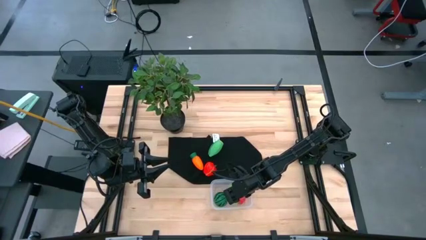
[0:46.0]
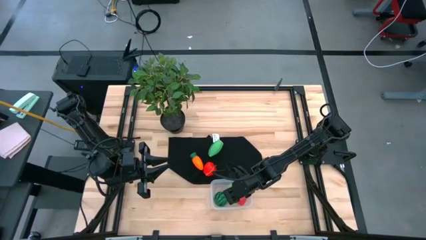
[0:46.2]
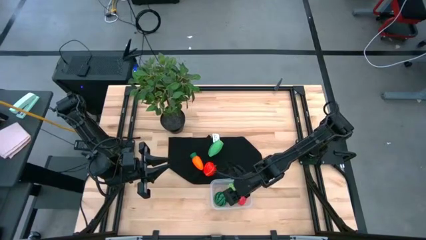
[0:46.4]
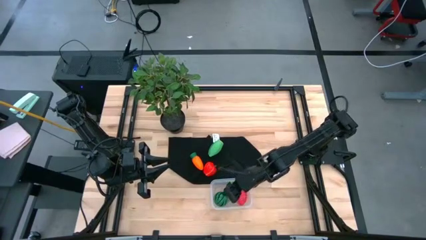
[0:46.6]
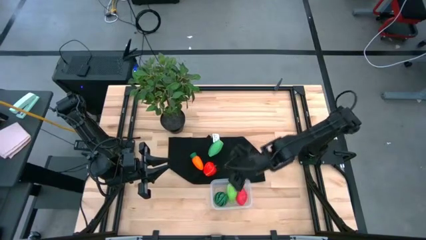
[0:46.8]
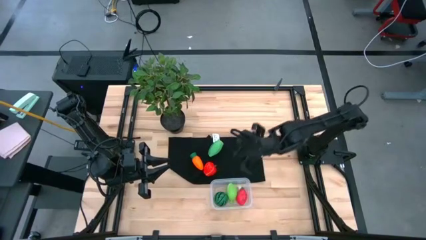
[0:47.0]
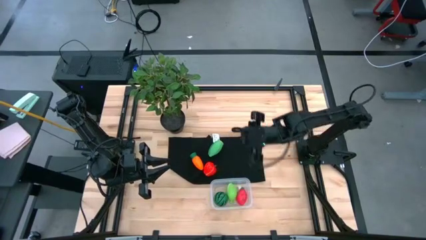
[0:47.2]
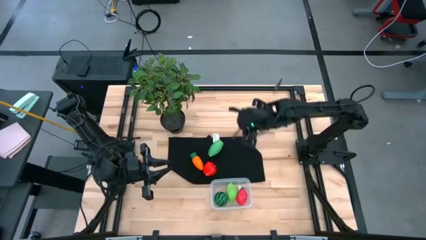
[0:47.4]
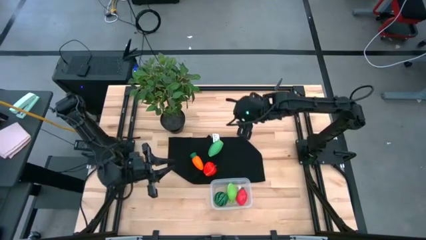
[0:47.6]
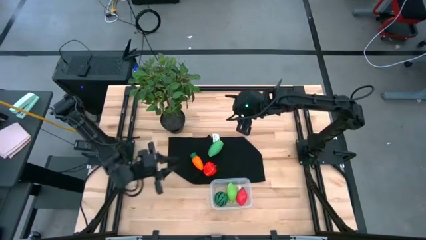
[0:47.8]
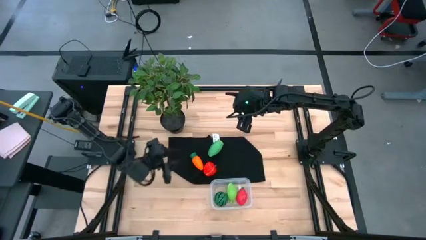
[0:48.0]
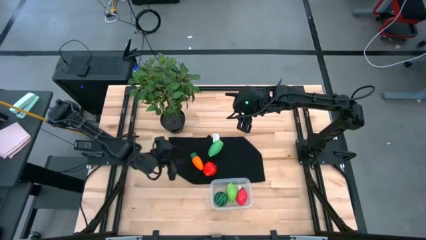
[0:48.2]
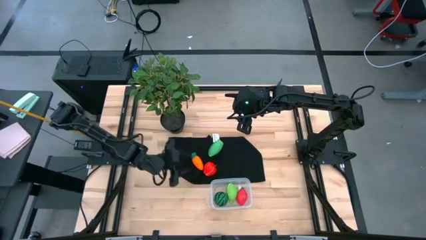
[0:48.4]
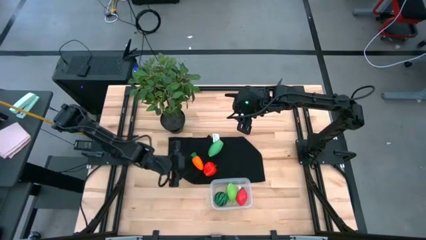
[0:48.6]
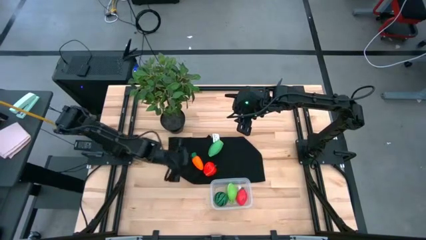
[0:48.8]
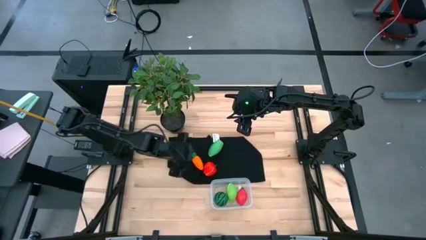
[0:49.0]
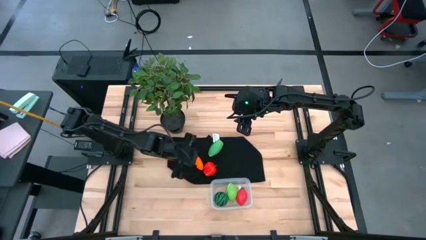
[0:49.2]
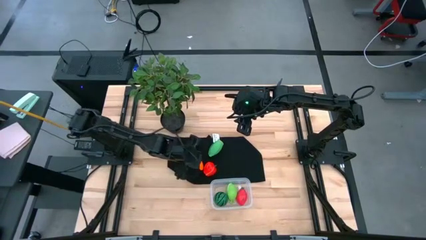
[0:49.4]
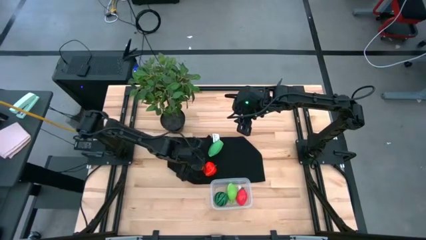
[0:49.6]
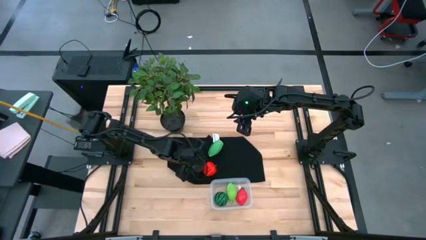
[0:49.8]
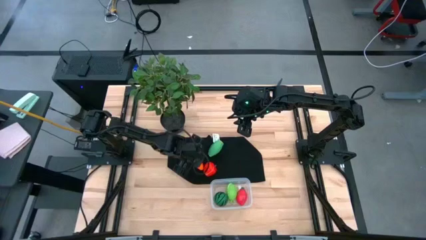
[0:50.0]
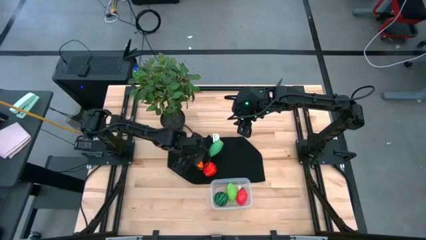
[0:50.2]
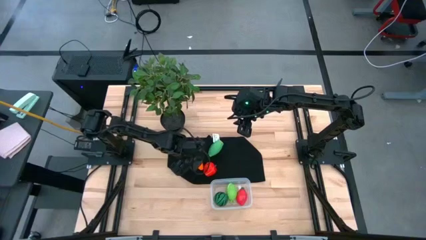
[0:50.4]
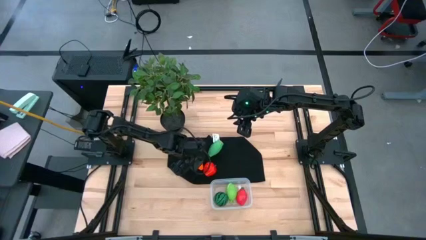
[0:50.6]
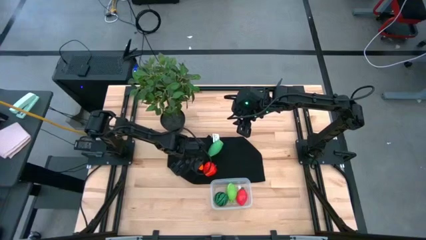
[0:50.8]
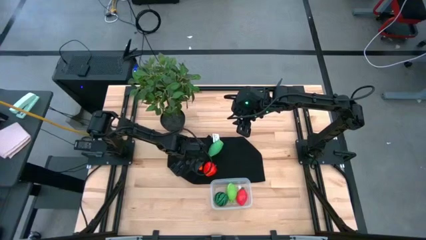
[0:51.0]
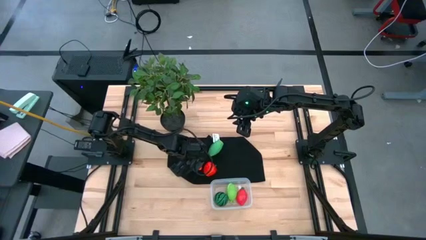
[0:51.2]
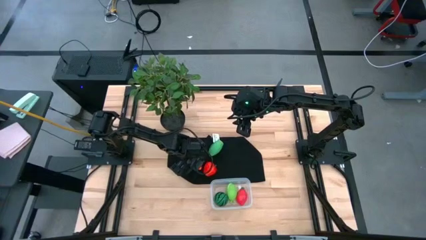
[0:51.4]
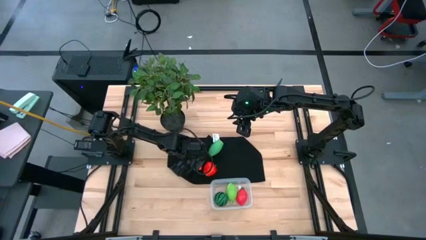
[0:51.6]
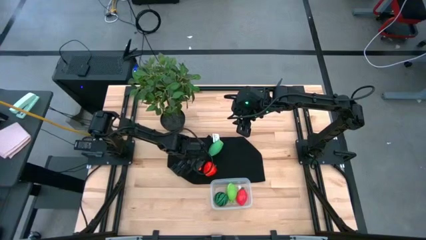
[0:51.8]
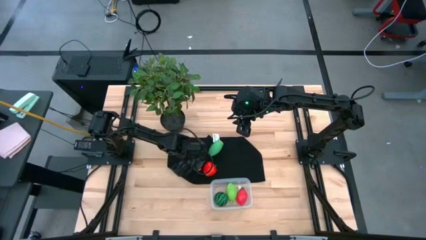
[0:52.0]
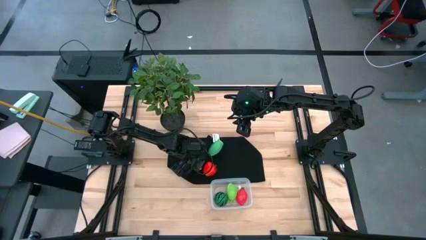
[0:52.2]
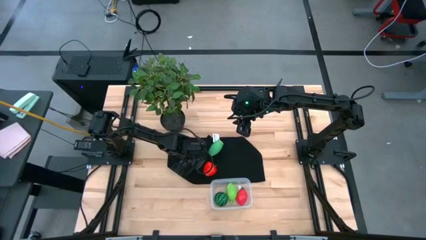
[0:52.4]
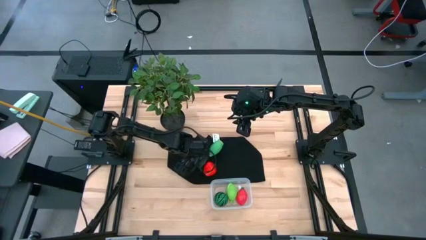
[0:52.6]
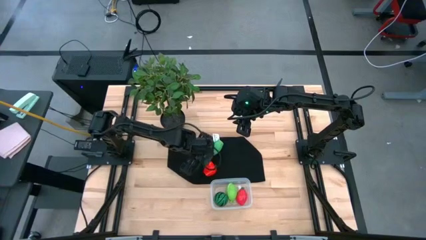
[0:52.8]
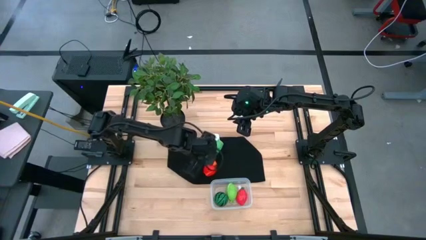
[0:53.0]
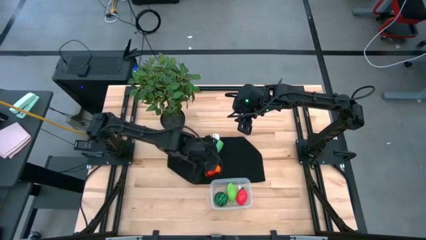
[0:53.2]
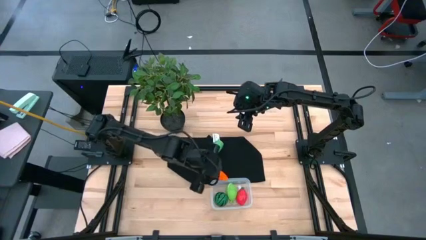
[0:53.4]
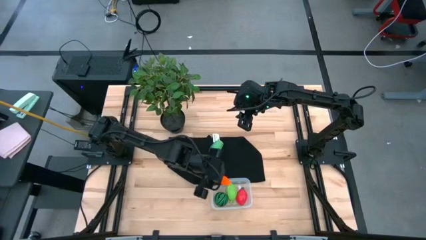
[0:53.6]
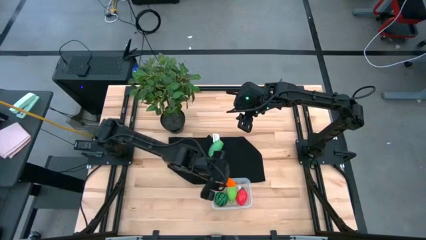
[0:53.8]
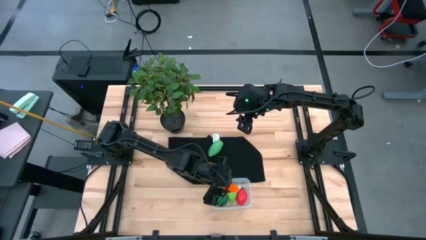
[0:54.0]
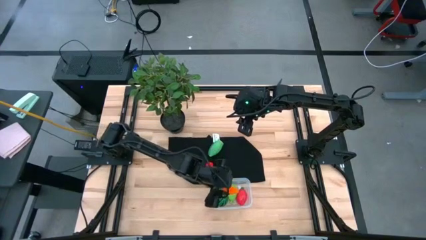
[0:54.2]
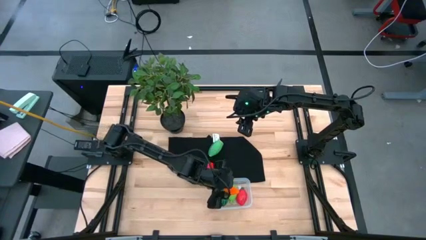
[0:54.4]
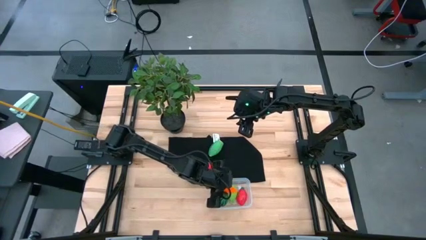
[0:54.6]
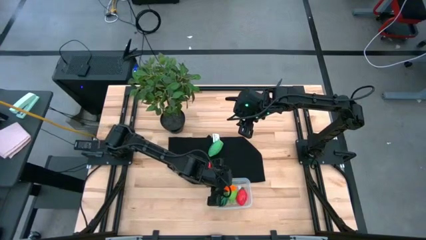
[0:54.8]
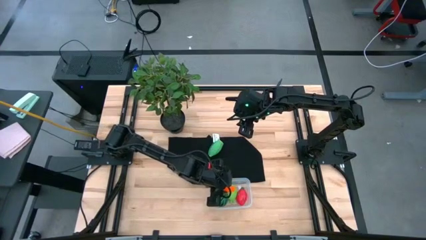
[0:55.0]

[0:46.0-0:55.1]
Task: Pick and placing Produce into tupperware
Put the carrot into the transparent bin

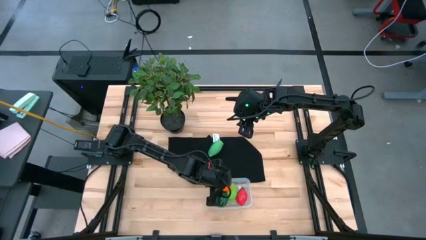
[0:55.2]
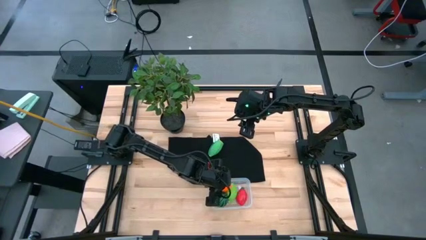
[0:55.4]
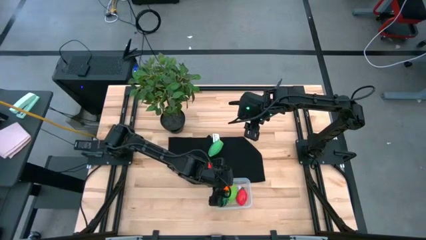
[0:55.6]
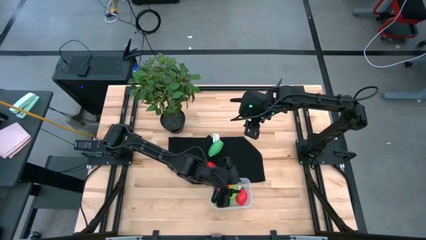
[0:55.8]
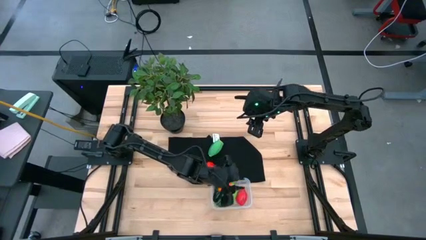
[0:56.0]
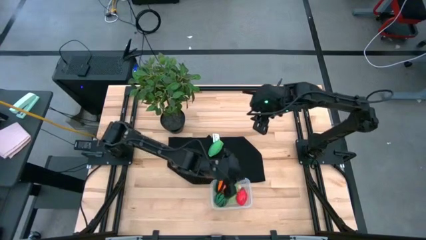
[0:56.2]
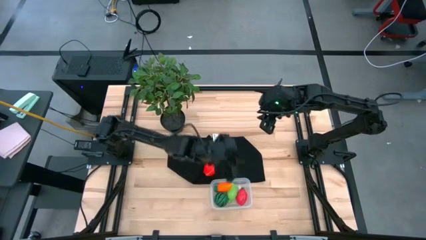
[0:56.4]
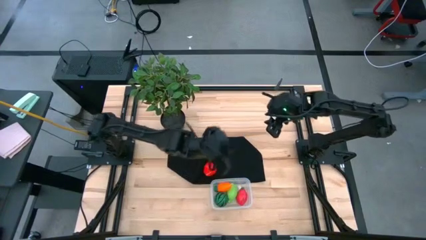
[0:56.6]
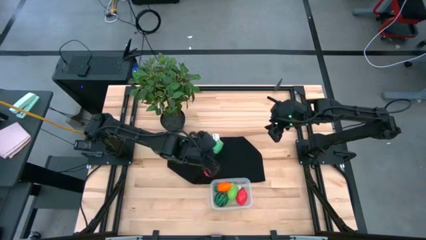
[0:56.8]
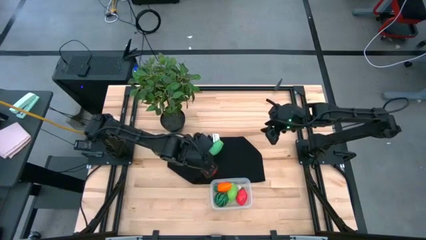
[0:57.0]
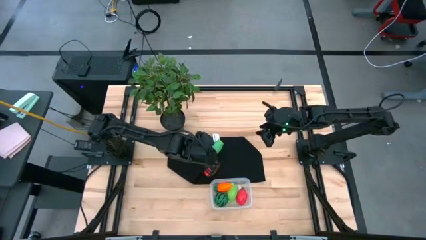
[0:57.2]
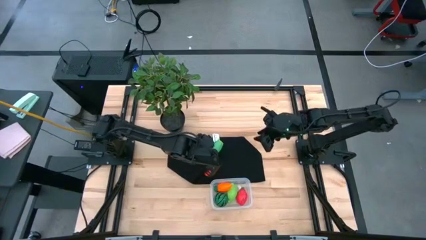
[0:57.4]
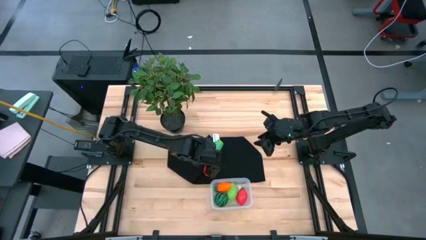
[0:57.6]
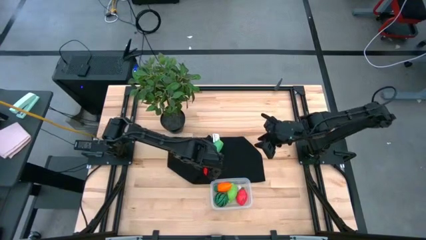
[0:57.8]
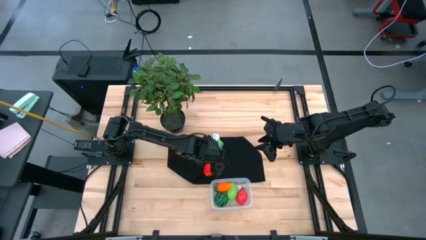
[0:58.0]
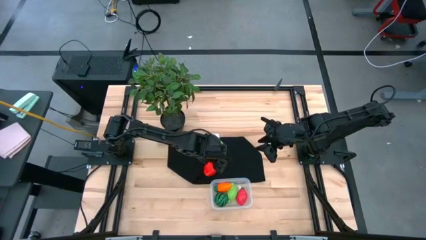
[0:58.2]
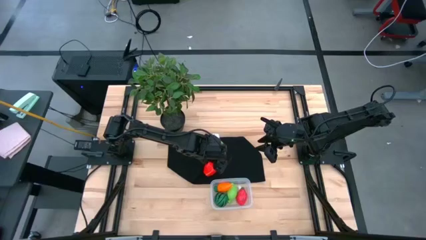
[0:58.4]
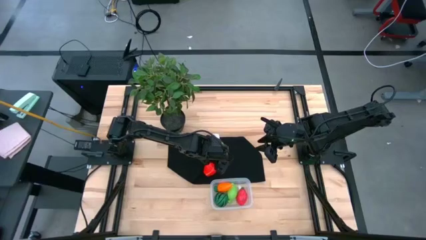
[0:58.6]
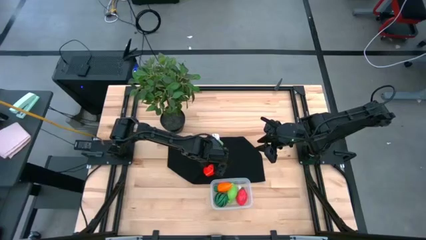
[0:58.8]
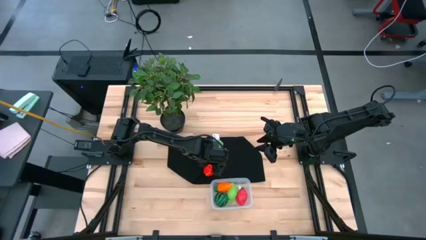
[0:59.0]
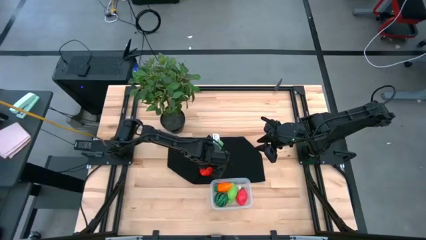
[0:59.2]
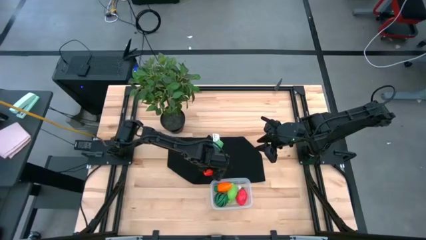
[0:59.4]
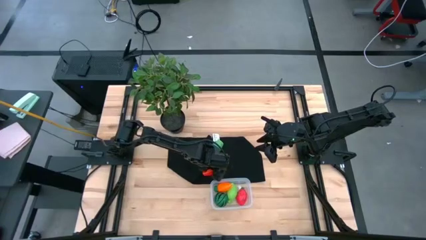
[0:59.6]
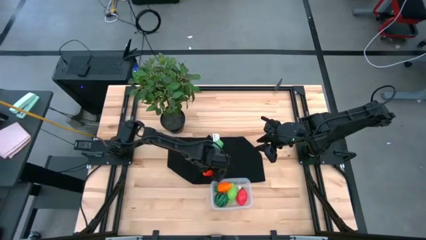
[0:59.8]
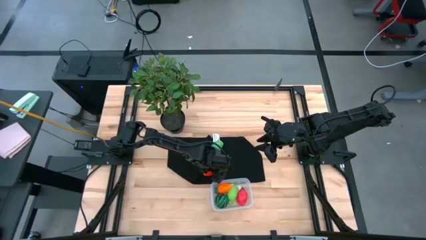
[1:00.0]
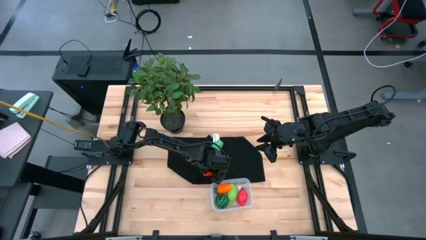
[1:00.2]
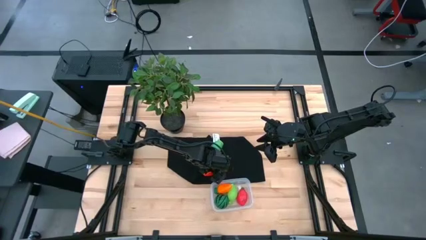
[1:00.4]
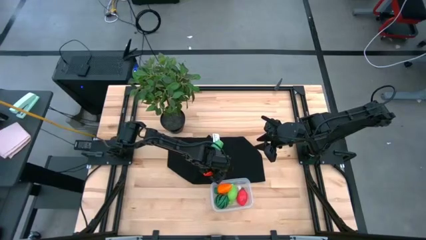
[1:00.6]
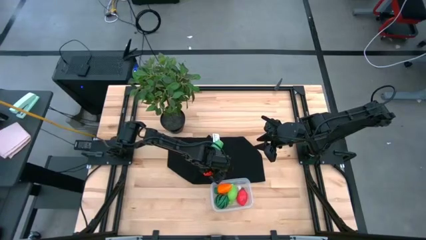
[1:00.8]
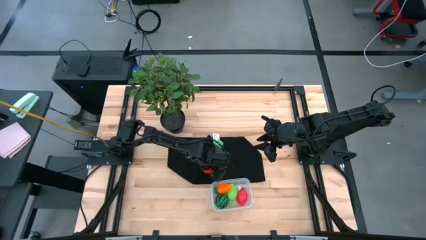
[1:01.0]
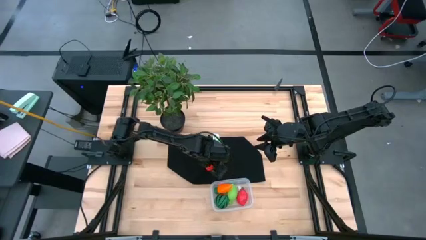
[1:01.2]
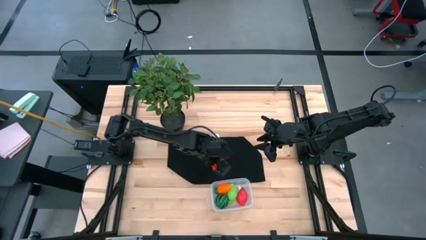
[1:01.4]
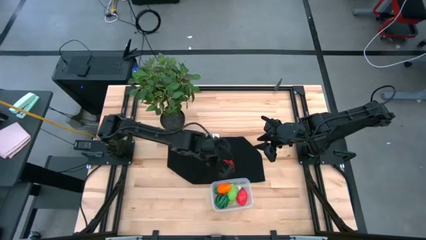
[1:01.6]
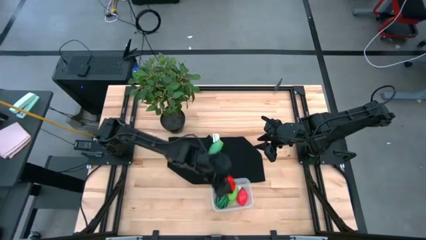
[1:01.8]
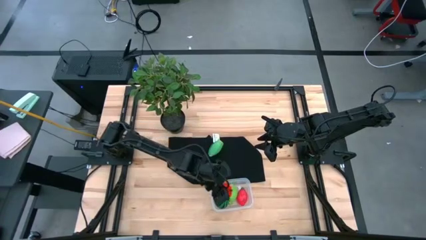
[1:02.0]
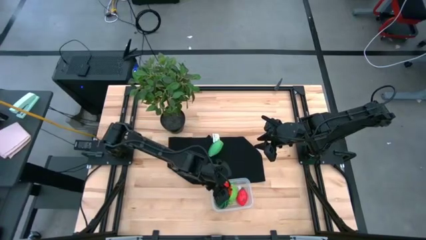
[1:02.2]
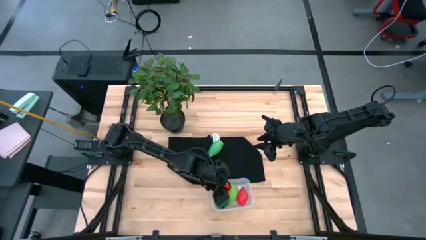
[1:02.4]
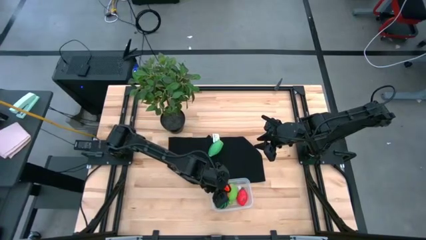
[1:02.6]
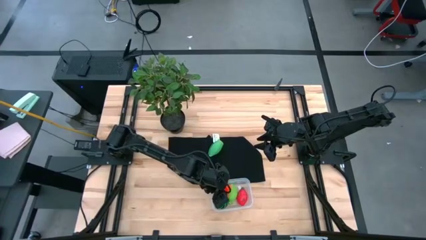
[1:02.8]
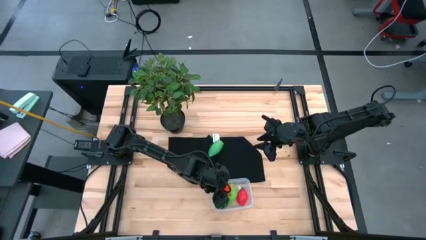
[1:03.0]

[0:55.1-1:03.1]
Put the apple into the transparent bin
